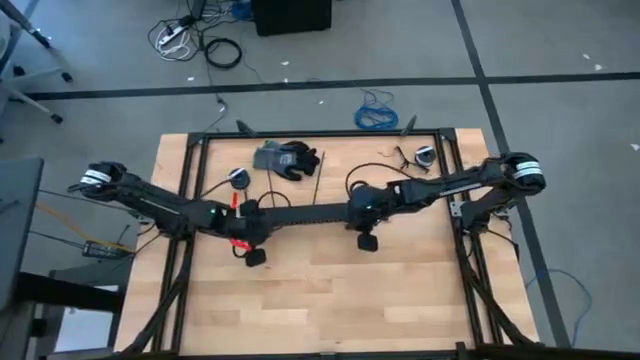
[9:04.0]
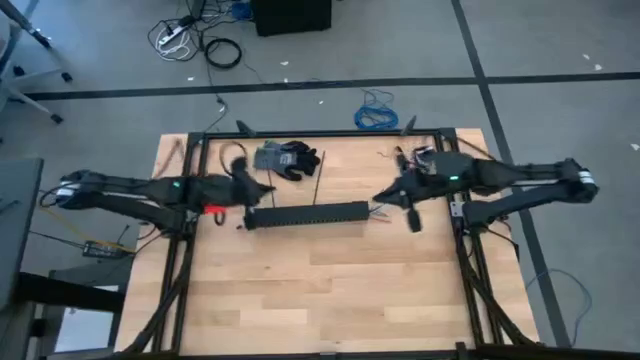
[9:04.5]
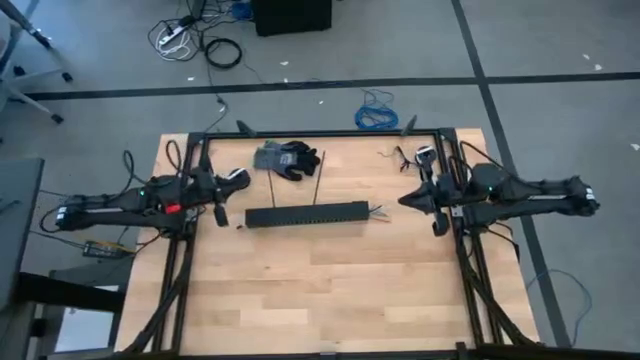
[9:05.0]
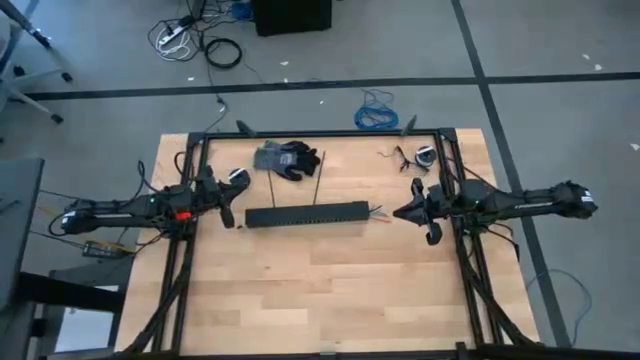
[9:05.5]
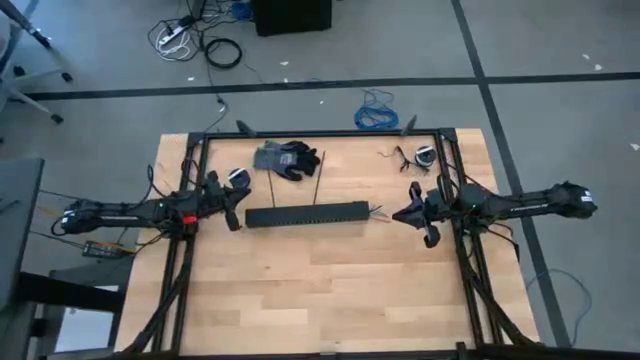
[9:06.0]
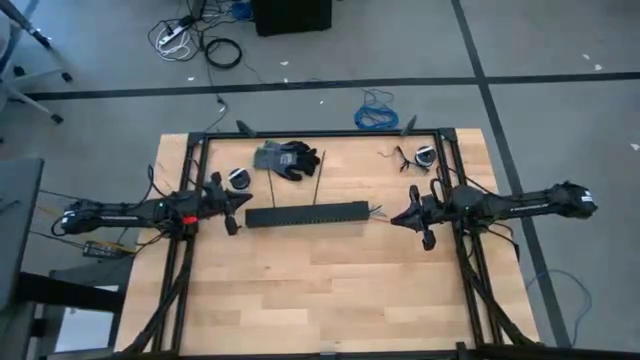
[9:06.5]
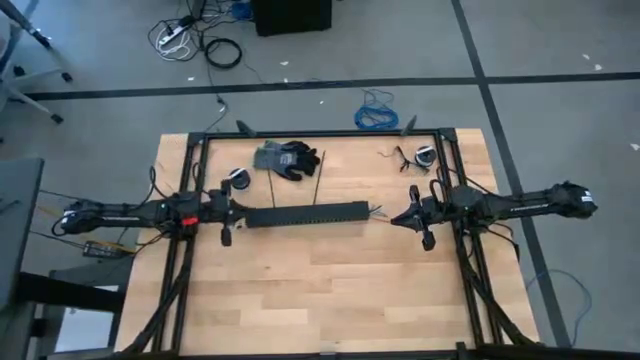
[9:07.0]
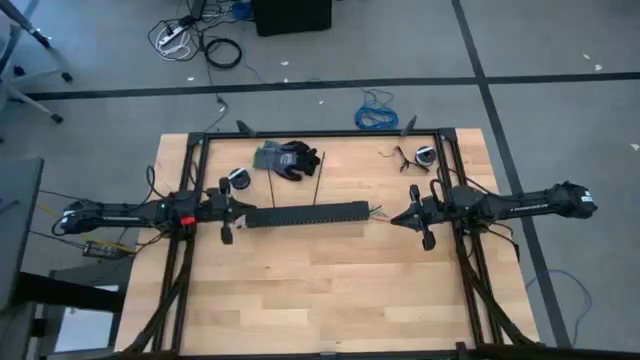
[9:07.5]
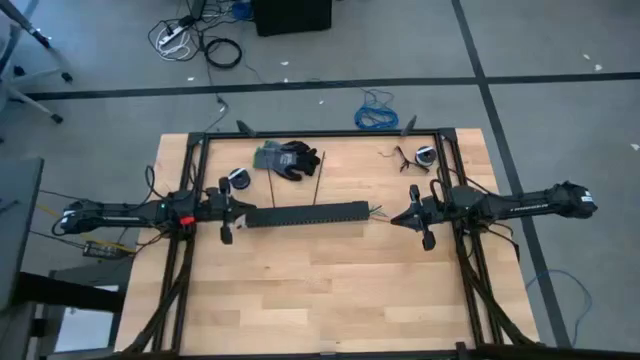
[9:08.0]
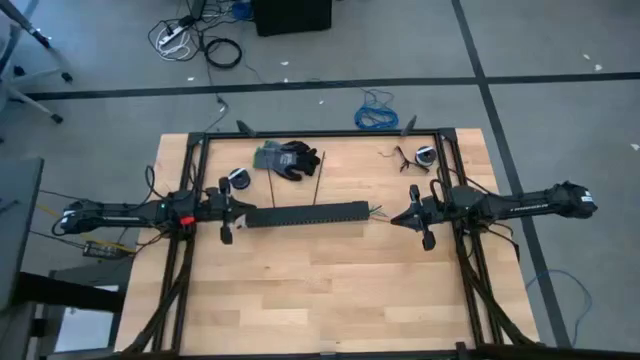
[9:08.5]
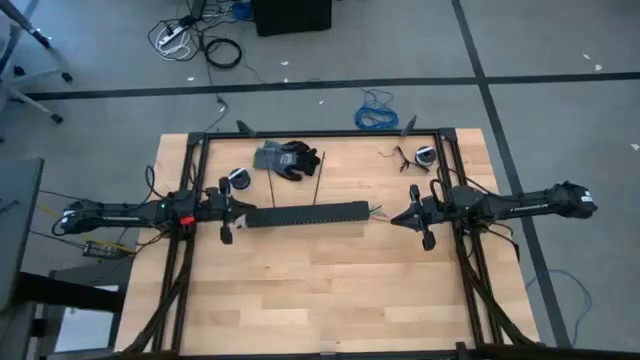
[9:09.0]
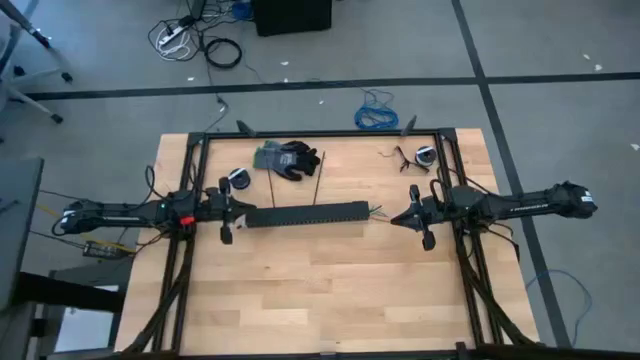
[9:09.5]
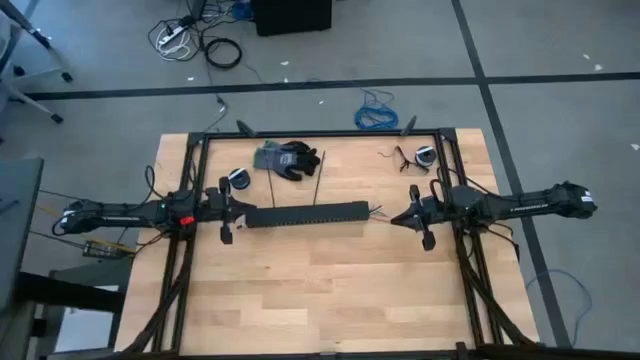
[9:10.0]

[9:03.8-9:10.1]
Task: Ziptie cables
Return to Home Position

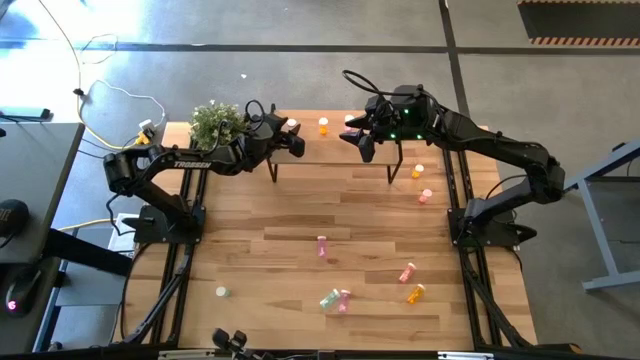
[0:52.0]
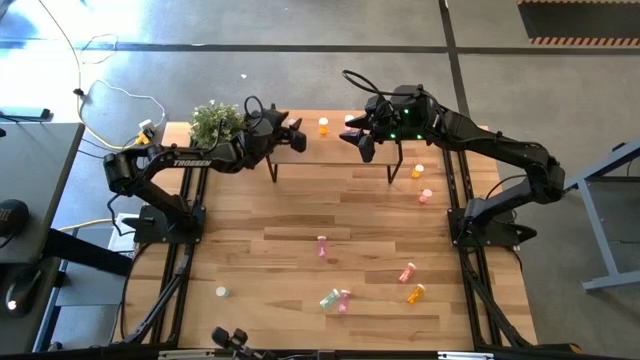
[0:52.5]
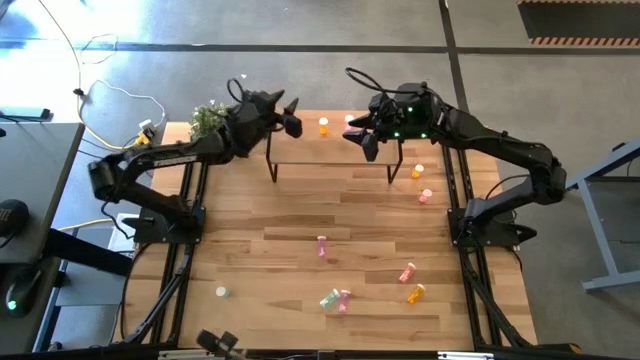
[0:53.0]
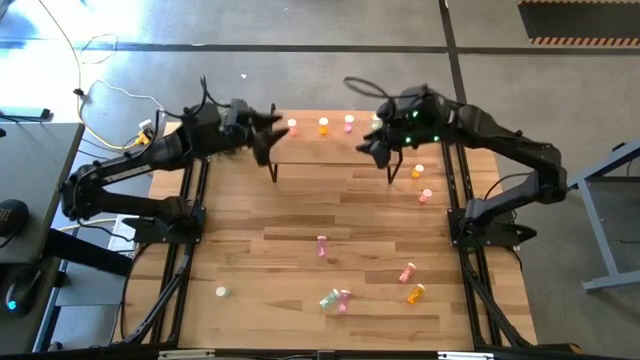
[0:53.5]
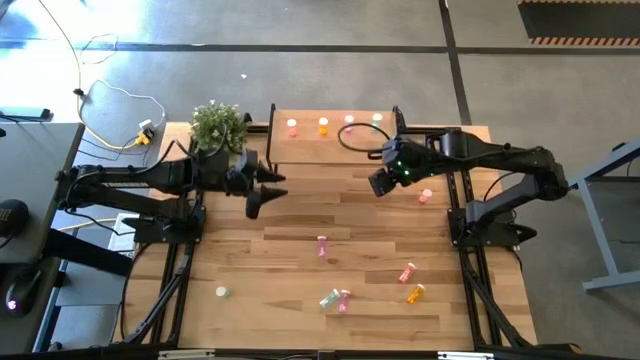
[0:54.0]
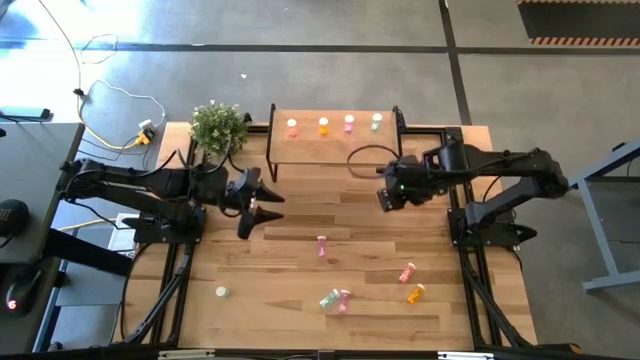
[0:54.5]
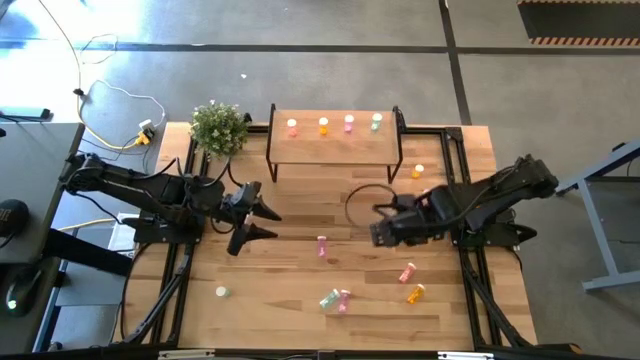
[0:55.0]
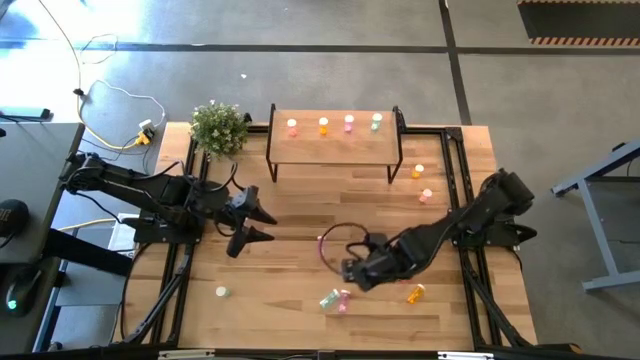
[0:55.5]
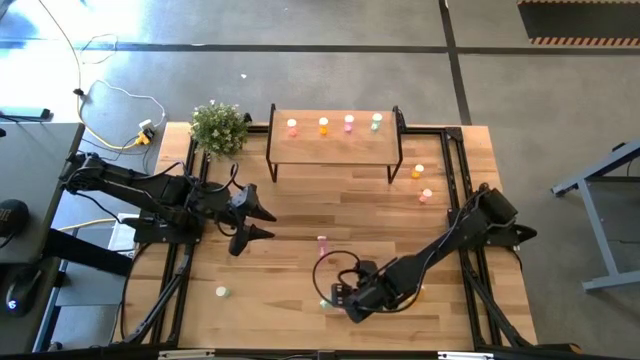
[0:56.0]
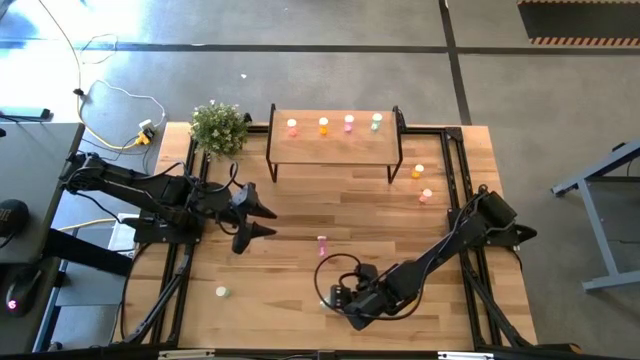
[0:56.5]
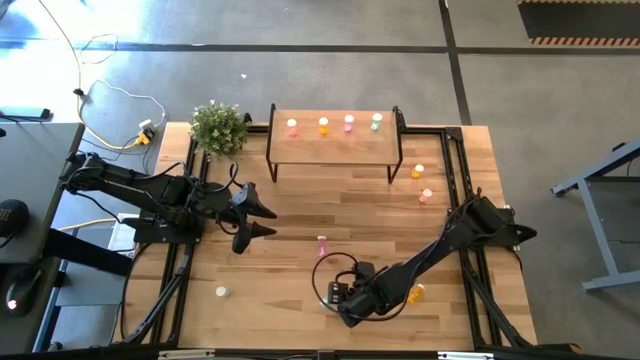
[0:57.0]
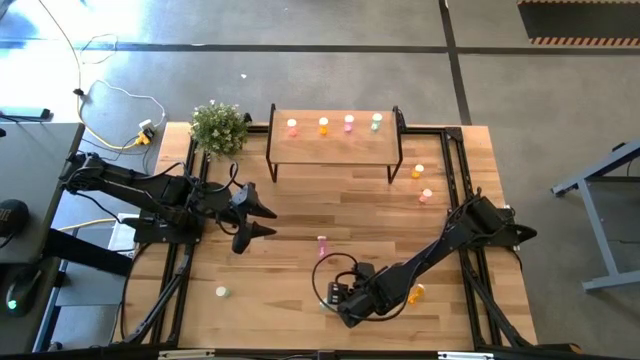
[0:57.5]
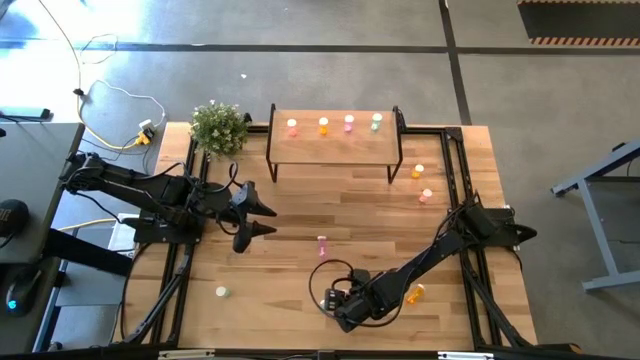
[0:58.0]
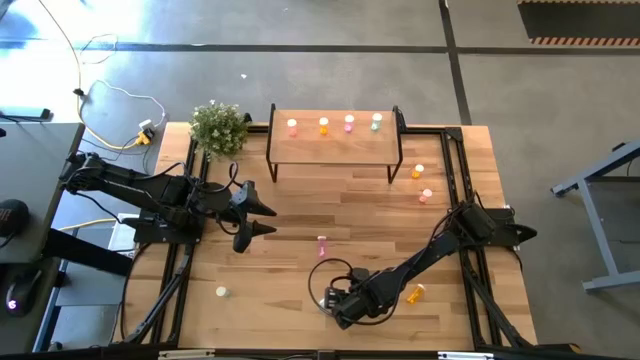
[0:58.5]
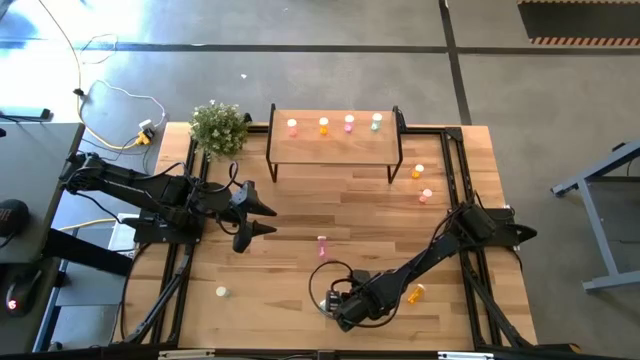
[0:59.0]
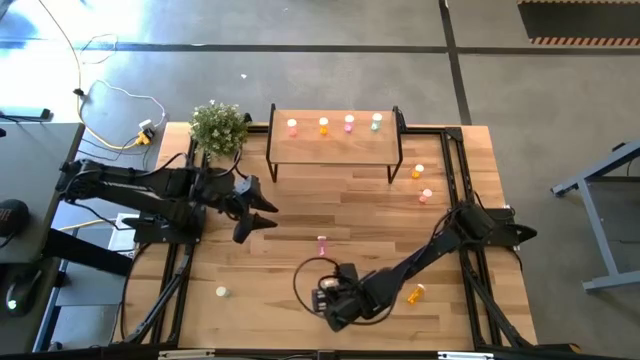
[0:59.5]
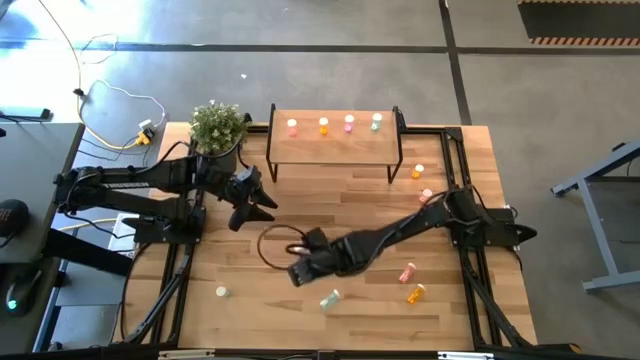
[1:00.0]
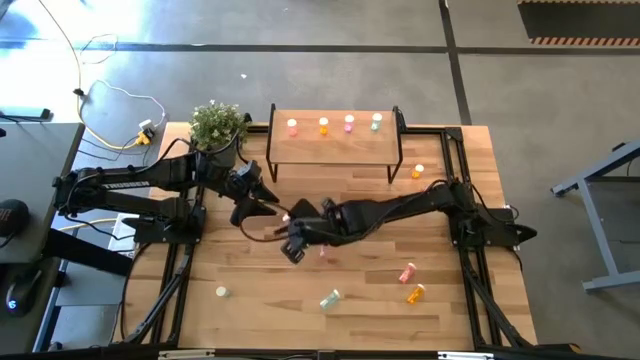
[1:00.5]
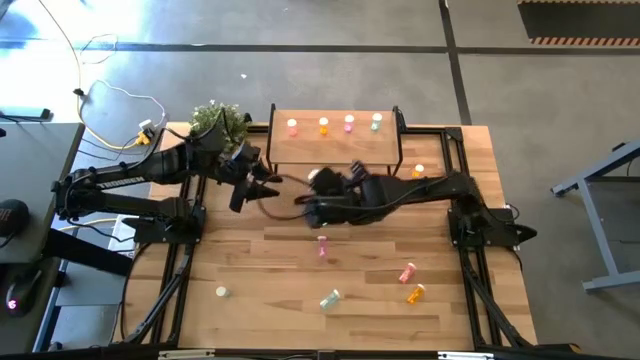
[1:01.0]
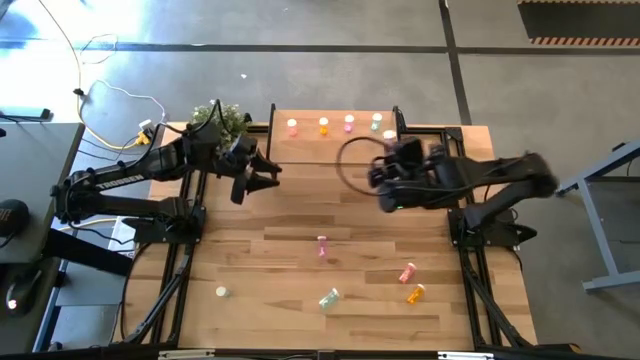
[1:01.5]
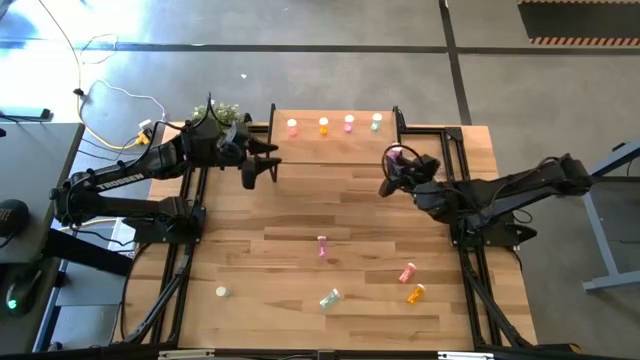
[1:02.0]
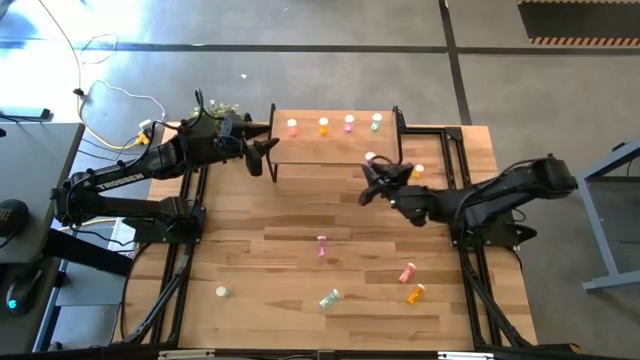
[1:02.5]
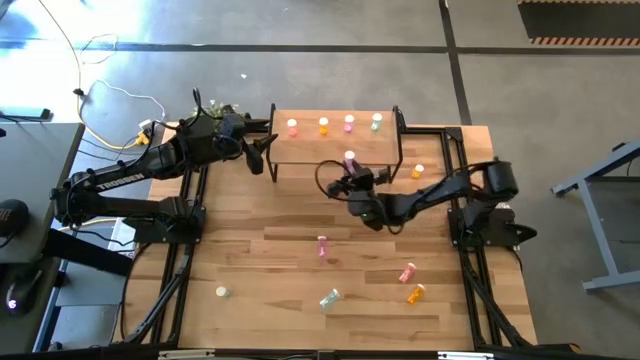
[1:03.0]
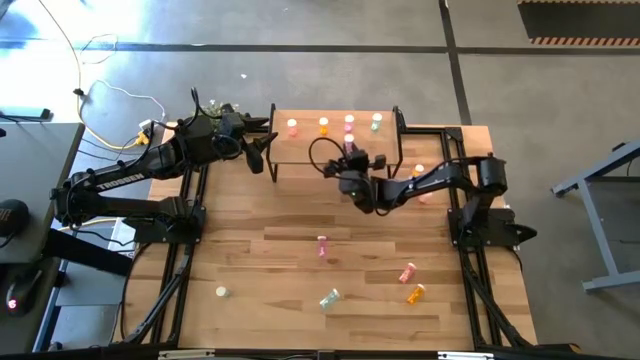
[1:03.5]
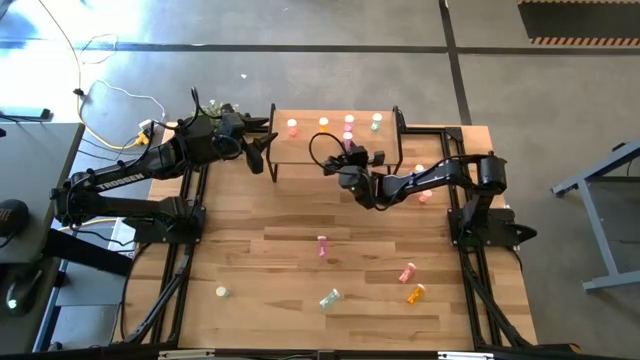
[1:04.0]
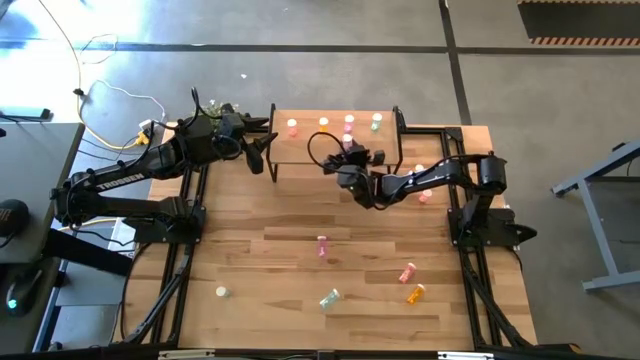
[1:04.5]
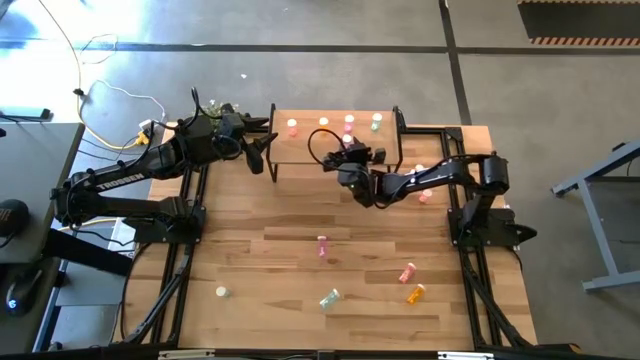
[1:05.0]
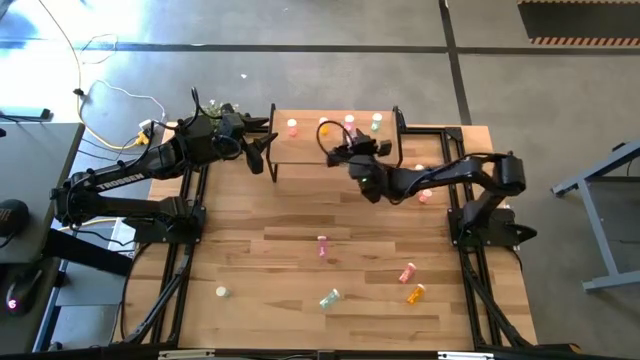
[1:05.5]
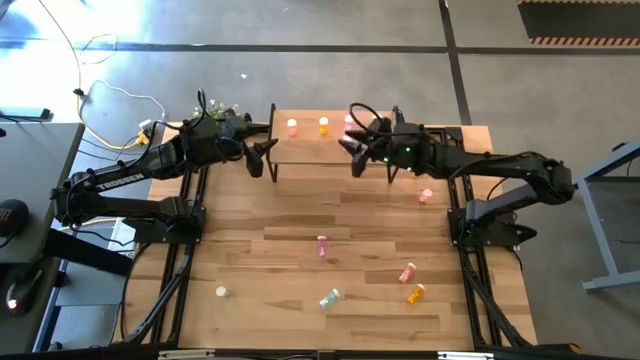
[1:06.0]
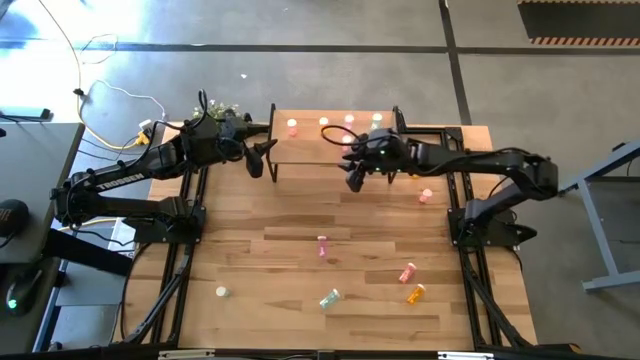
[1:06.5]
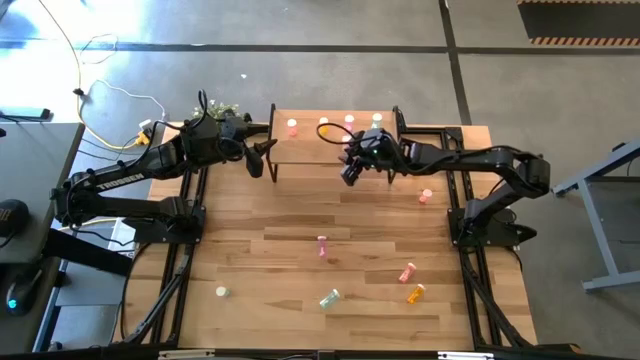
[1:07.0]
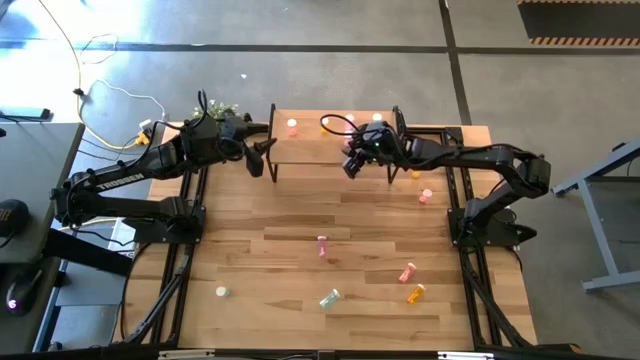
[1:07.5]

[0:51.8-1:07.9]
Task: Pick and place medicine bottles onto shelf by color
Put the bottom purple pill bottle on the shelf aligned with the other purple pill bottle
